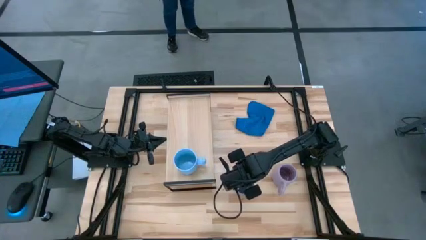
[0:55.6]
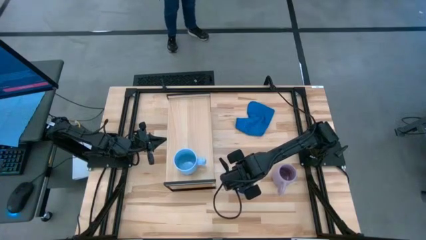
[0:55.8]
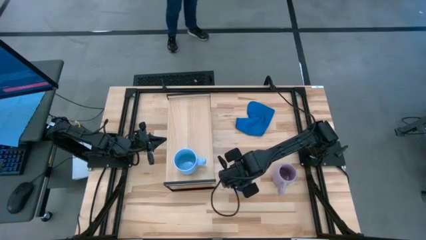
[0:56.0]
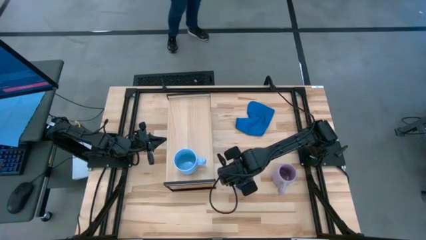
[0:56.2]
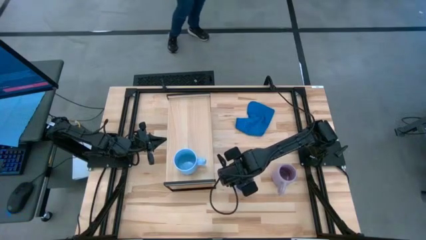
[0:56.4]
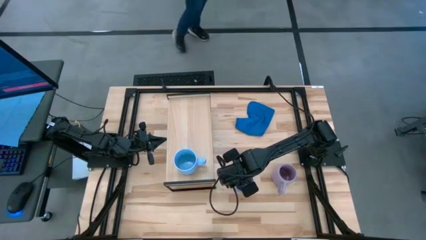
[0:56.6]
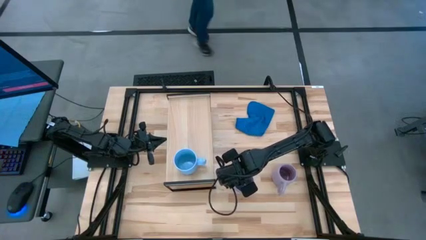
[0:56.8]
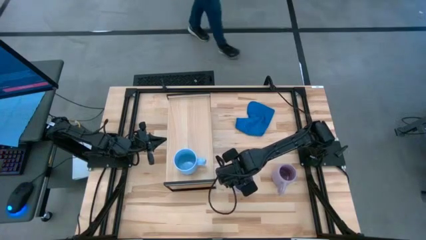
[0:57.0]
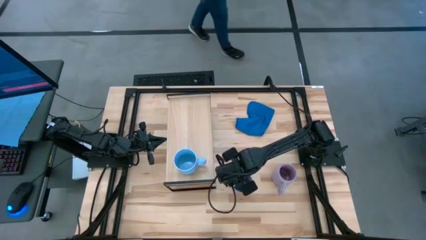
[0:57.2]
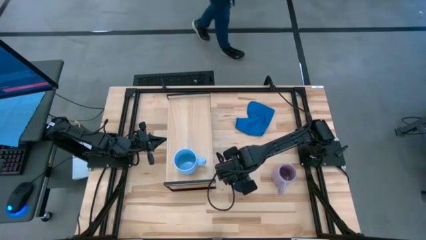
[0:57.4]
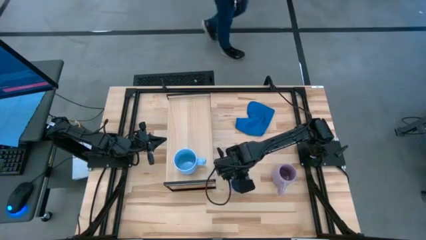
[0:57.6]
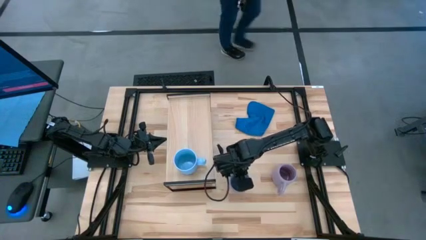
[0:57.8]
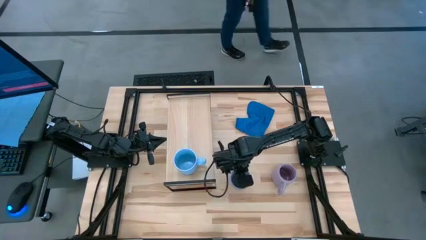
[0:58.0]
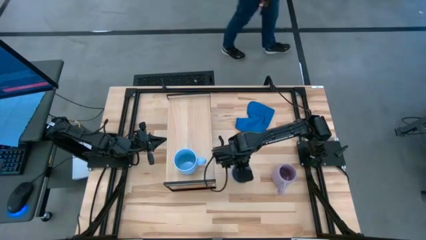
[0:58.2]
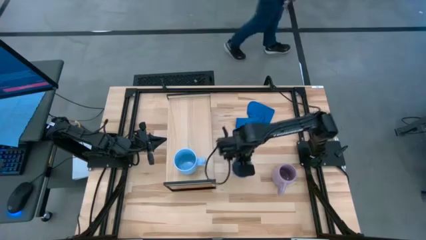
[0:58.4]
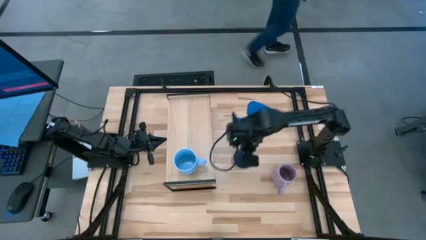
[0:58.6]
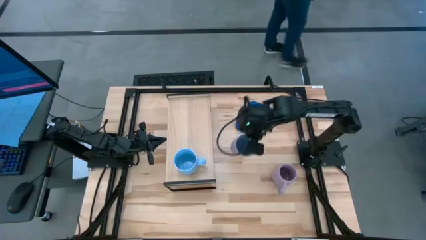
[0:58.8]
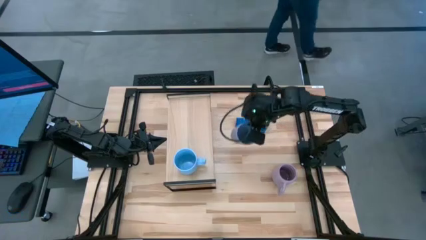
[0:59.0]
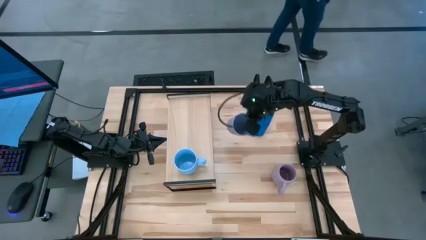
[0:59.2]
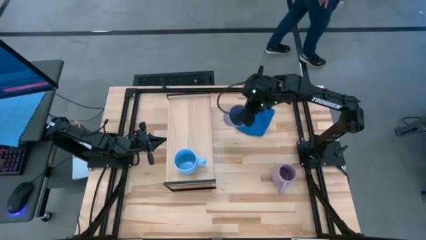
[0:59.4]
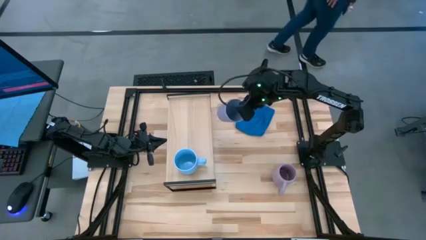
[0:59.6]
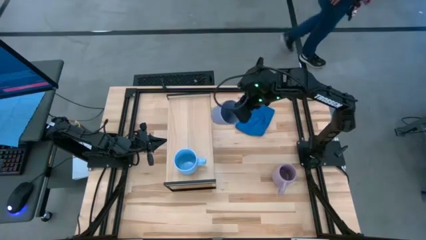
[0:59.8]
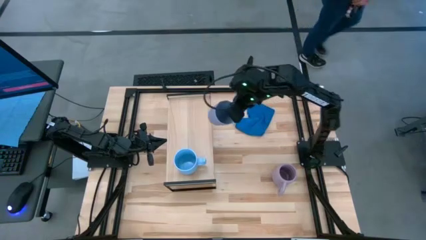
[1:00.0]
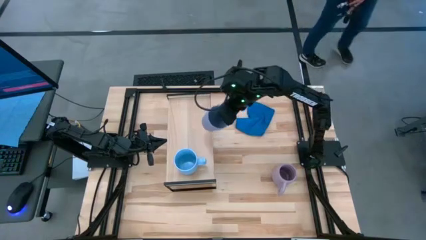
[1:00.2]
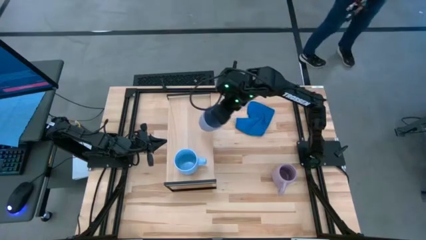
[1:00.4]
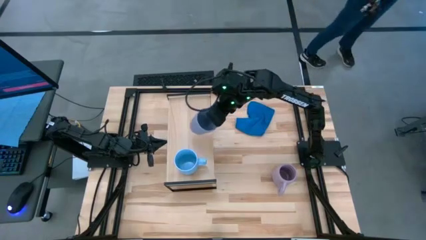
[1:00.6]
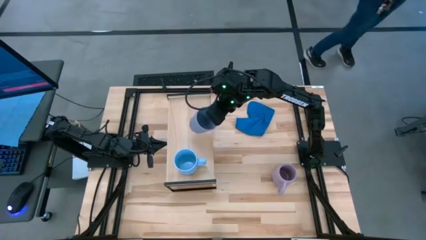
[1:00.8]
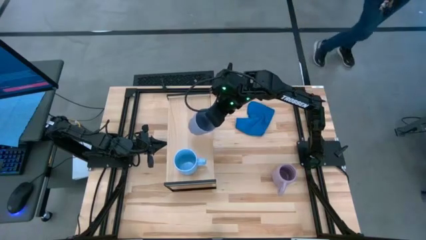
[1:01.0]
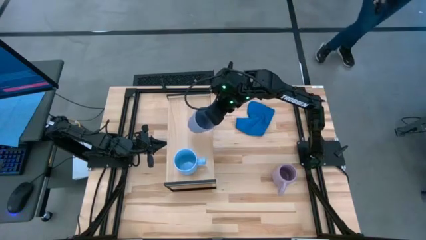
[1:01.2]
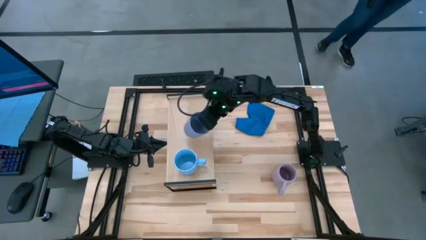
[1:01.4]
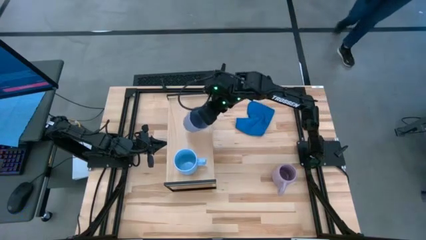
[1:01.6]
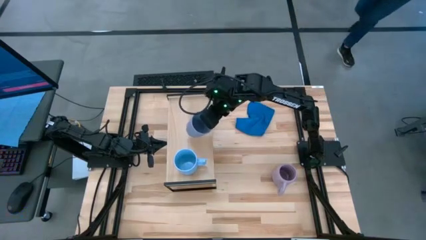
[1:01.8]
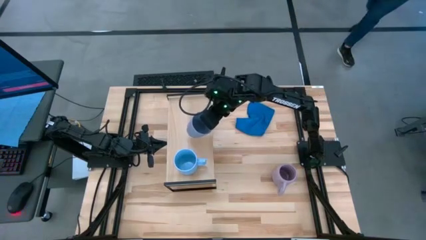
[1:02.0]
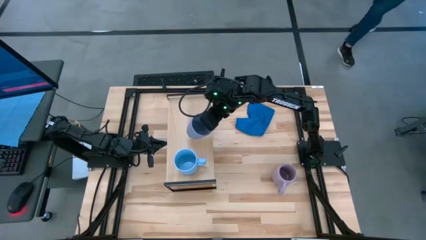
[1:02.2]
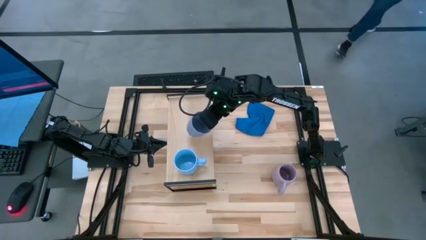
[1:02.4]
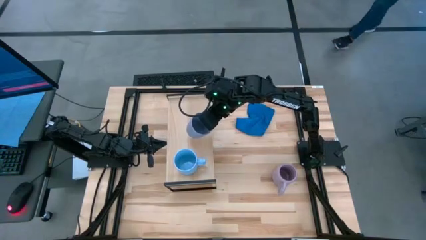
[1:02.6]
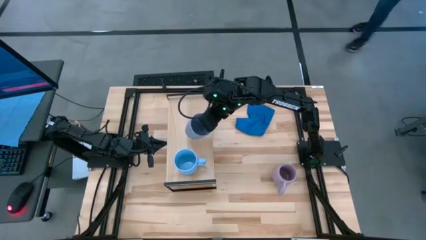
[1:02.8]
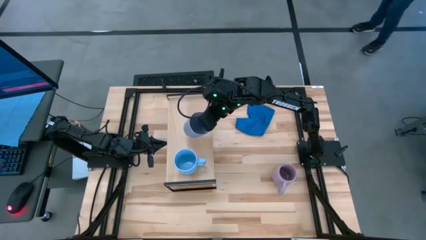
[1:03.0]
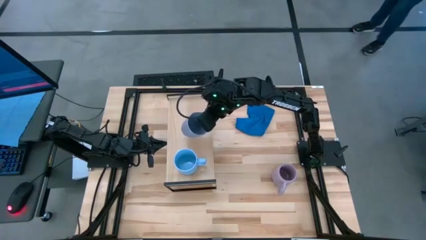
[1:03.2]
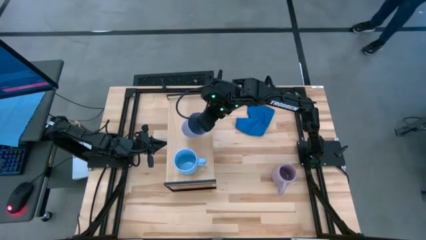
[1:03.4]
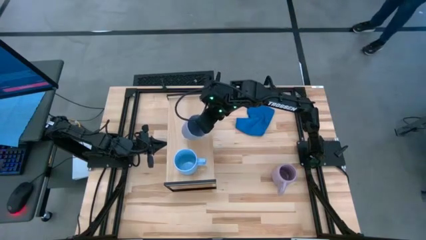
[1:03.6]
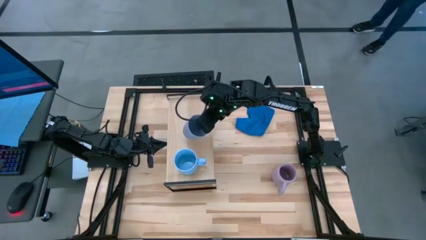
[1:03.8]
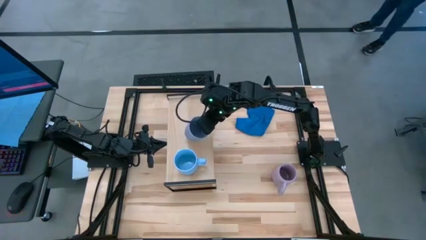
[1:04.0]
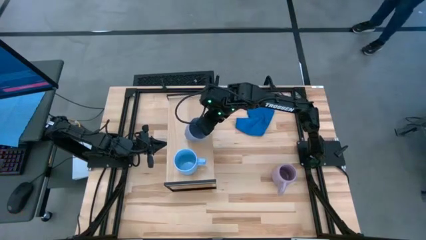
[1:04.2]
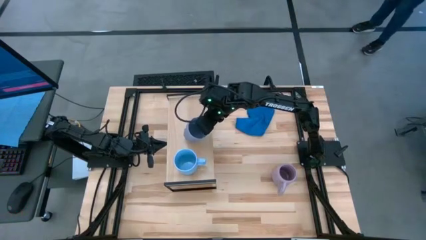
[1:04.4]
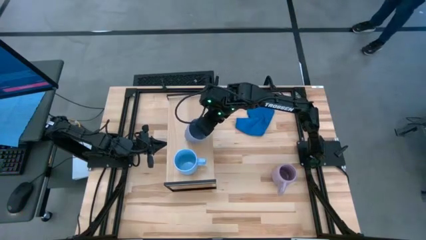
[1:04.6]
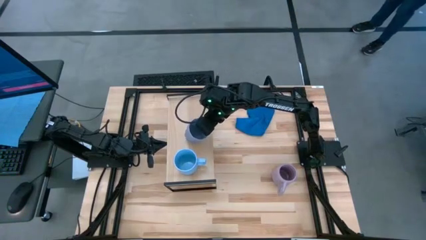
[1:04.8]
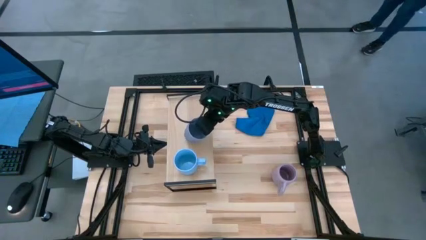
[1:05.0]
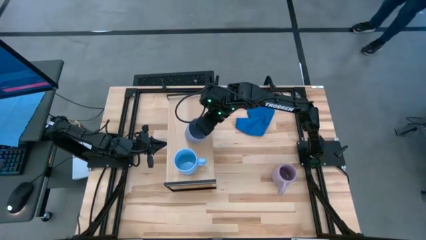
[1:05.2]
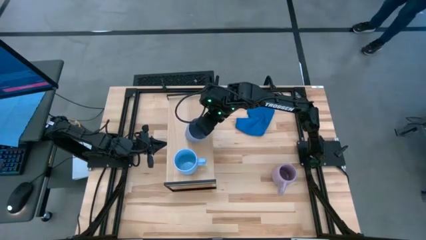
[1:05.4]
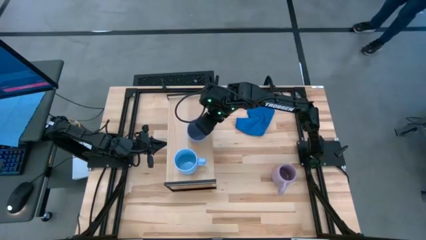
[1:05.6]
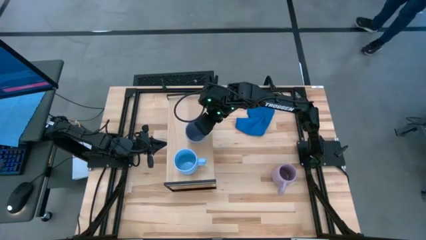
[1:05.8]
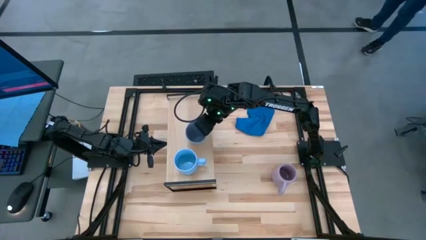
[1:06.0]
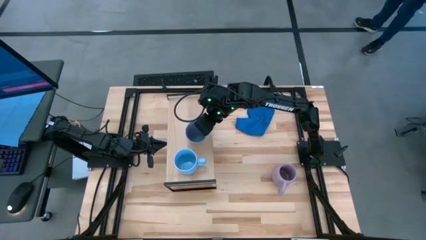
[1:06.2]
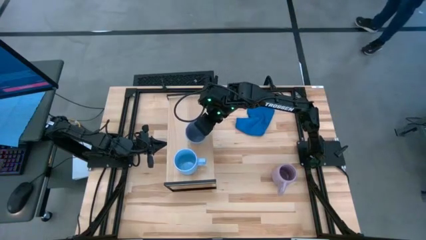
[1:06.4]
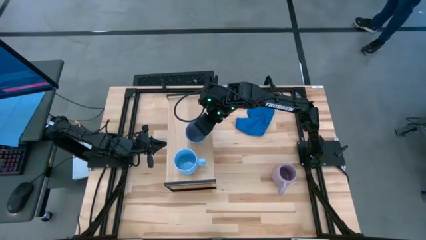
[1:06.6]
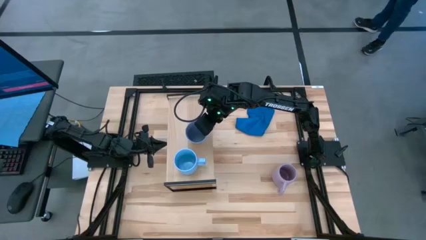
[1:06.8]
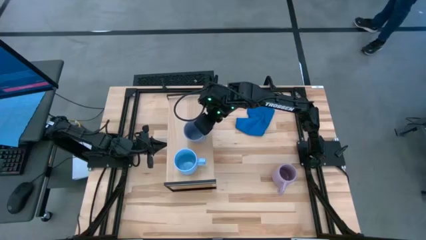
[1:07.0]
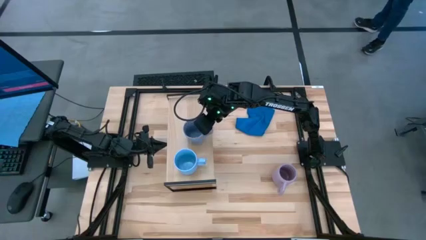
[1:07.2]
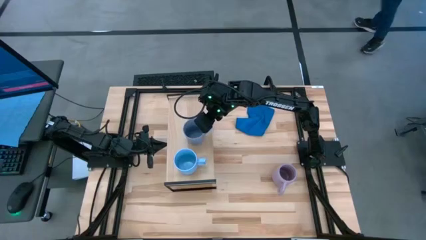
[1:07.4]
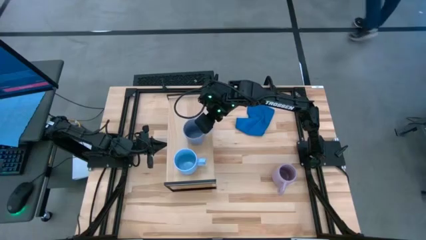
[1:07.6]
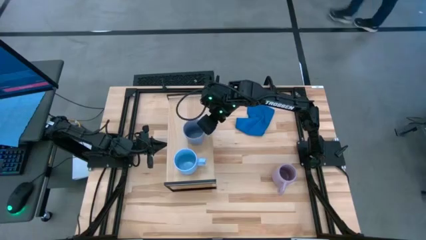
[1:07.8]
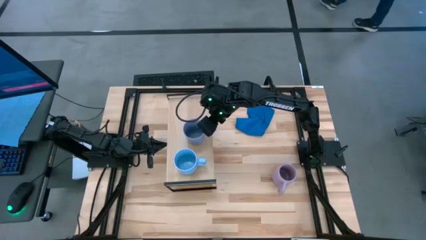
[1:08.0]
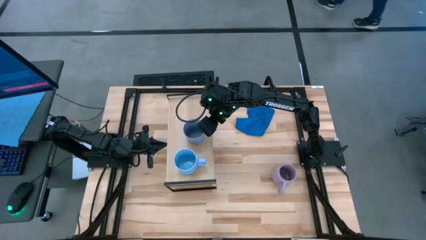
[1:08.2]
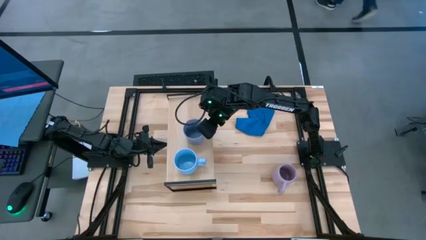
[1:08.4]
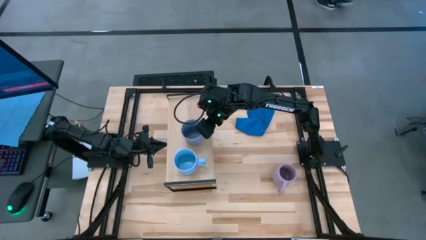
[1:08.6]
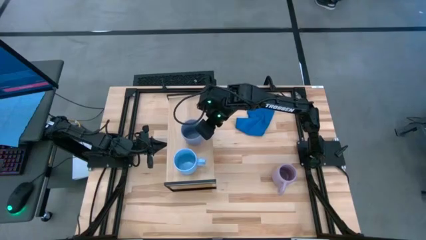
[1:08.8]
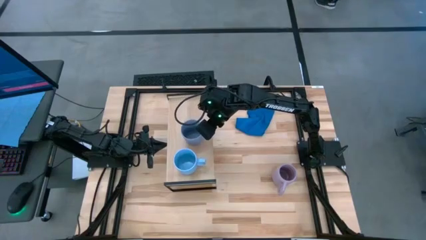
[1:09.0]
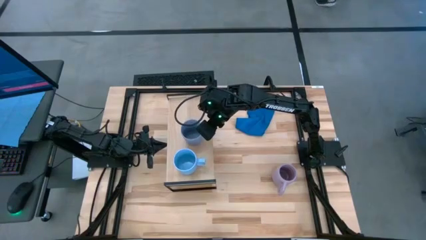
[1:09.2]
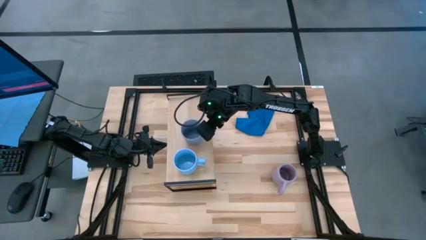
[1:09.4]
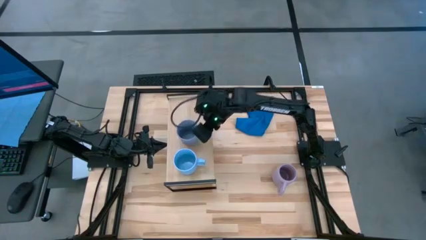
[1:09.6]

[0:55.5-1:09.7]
Task: Stack small to large cups/mugs on shelf
Put the blue mug on the shelf
